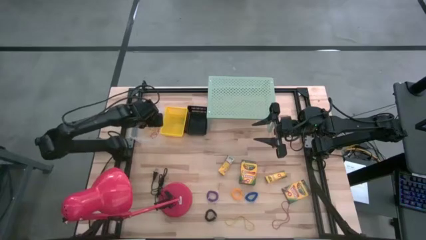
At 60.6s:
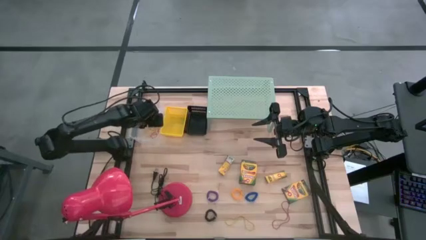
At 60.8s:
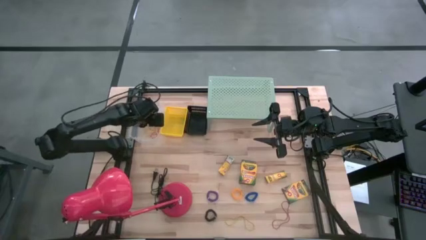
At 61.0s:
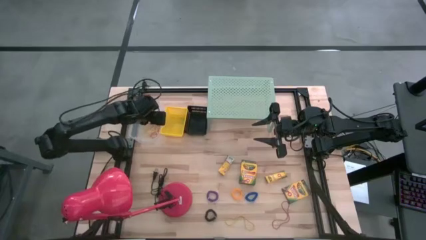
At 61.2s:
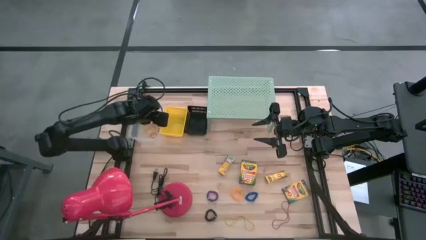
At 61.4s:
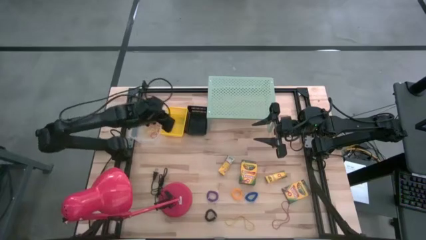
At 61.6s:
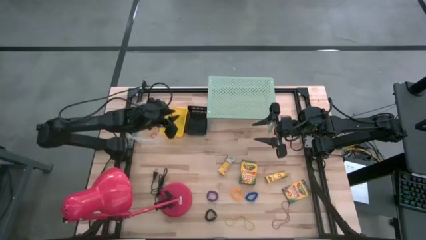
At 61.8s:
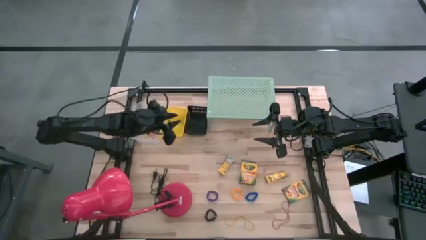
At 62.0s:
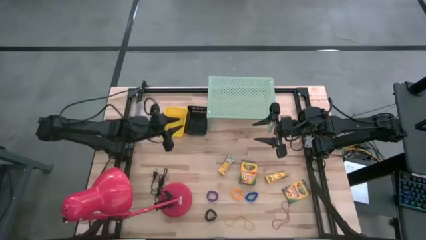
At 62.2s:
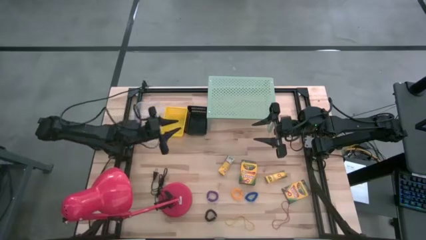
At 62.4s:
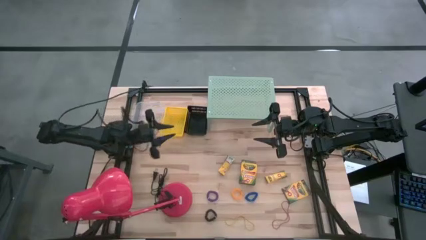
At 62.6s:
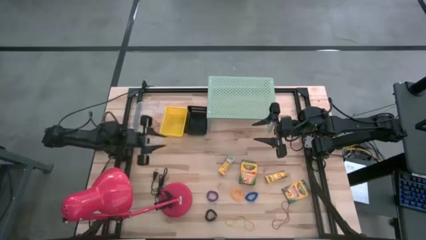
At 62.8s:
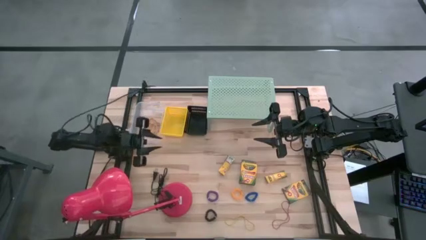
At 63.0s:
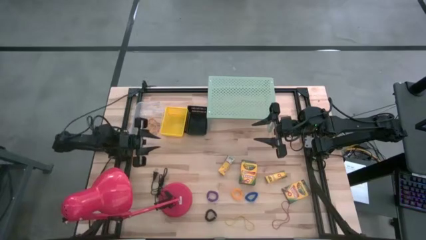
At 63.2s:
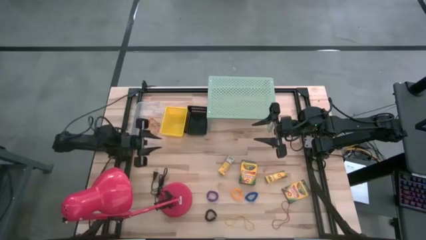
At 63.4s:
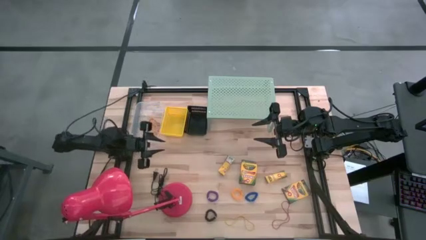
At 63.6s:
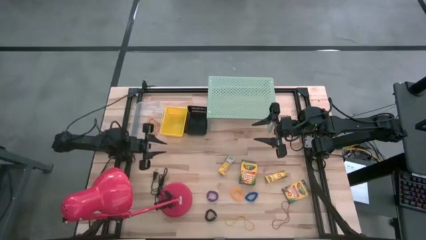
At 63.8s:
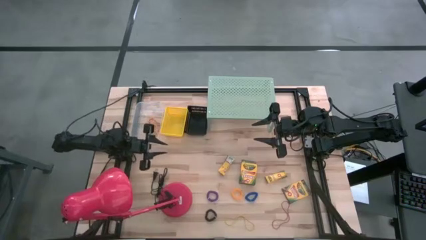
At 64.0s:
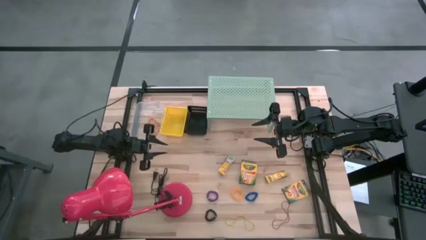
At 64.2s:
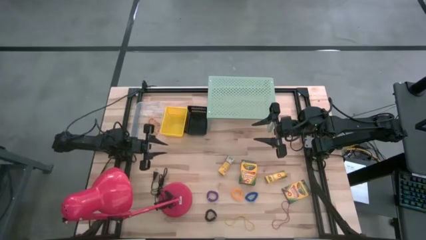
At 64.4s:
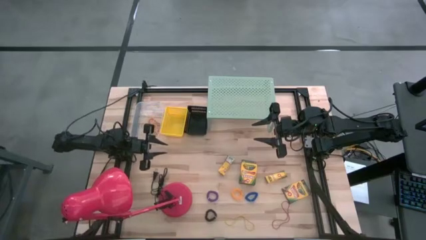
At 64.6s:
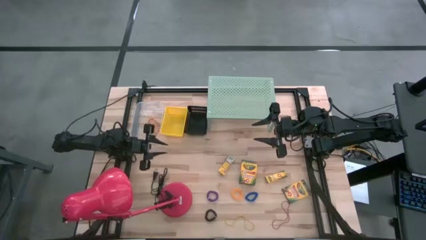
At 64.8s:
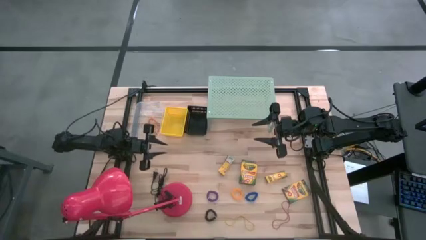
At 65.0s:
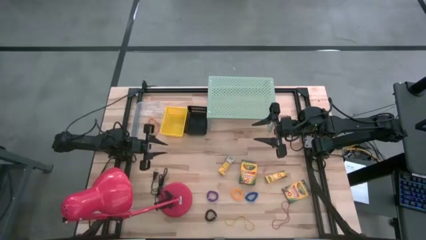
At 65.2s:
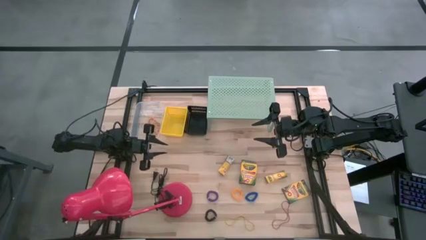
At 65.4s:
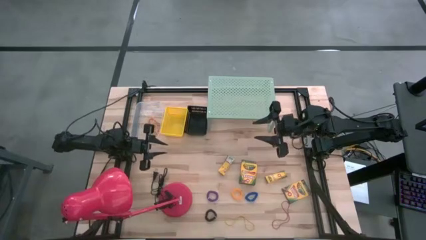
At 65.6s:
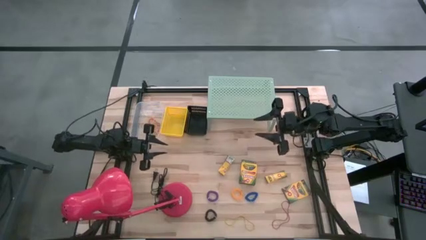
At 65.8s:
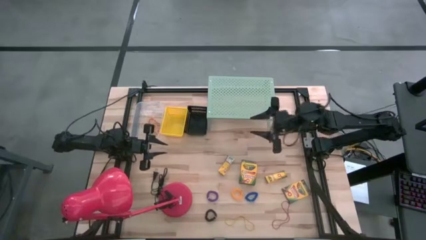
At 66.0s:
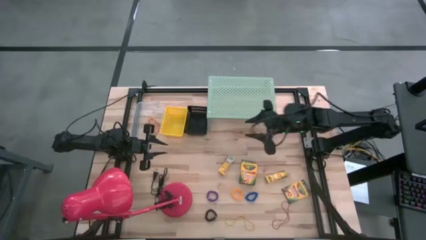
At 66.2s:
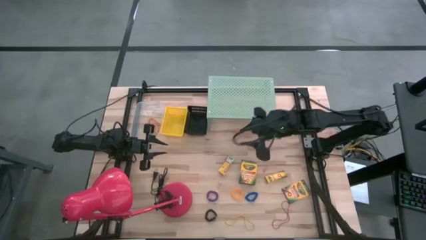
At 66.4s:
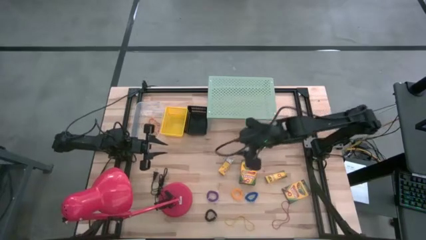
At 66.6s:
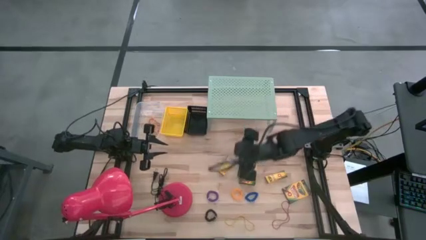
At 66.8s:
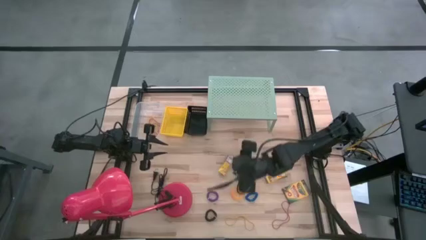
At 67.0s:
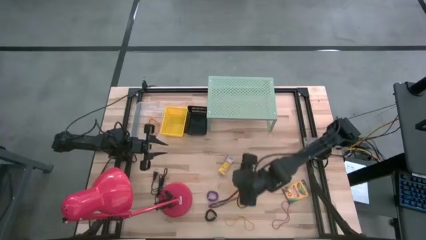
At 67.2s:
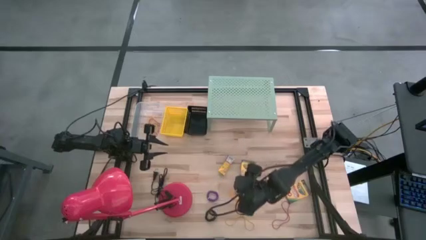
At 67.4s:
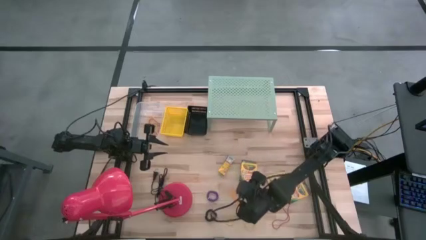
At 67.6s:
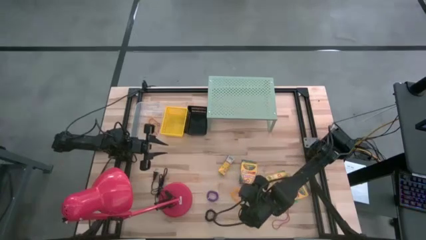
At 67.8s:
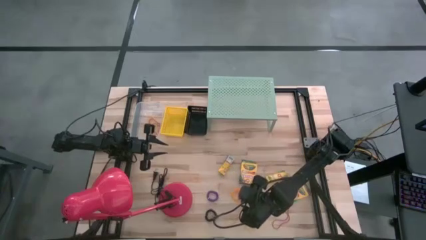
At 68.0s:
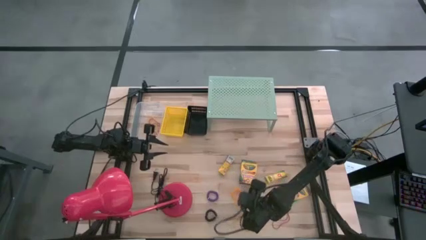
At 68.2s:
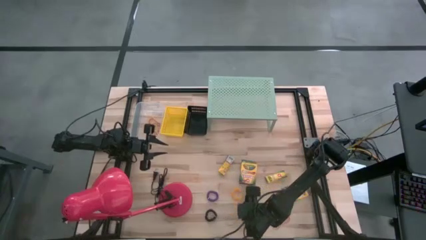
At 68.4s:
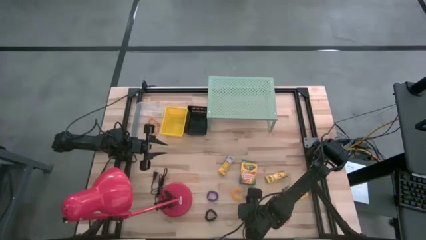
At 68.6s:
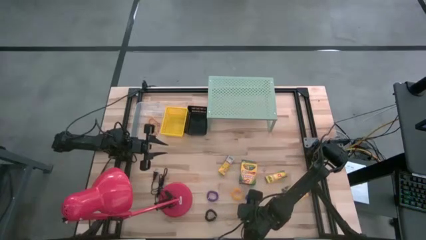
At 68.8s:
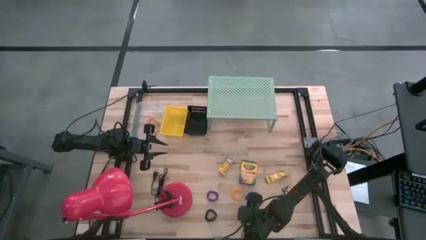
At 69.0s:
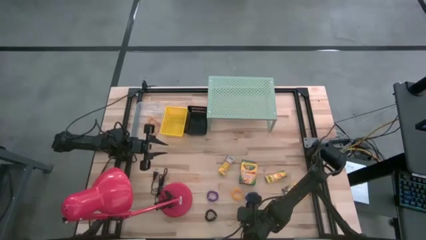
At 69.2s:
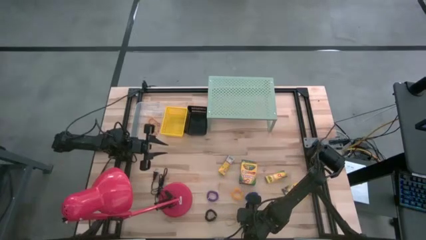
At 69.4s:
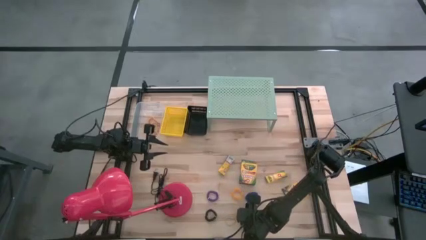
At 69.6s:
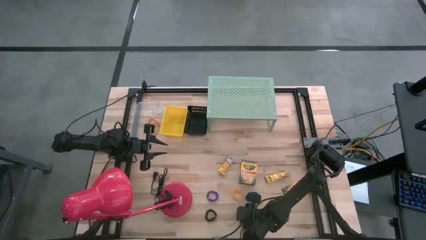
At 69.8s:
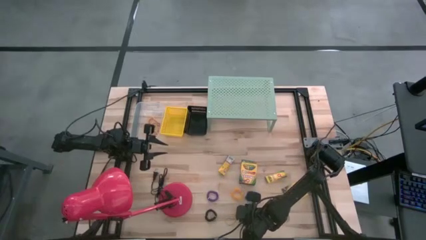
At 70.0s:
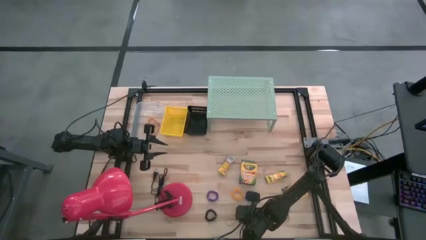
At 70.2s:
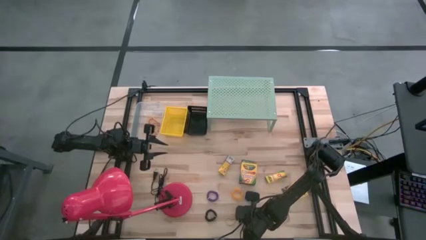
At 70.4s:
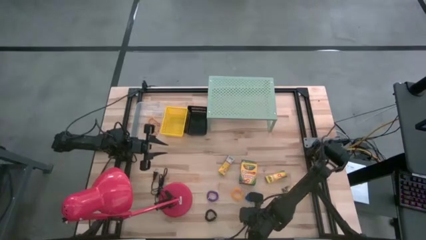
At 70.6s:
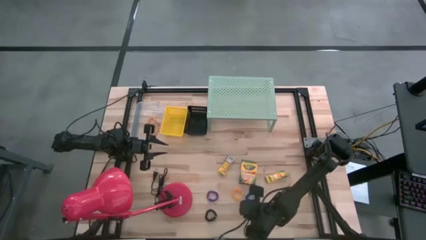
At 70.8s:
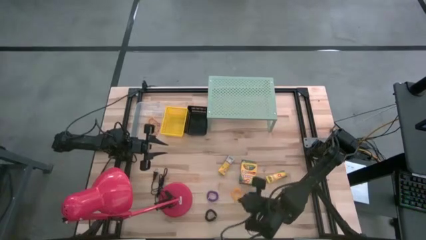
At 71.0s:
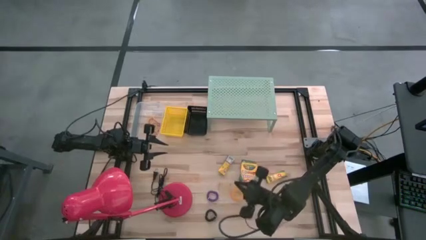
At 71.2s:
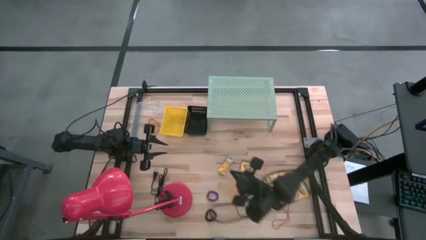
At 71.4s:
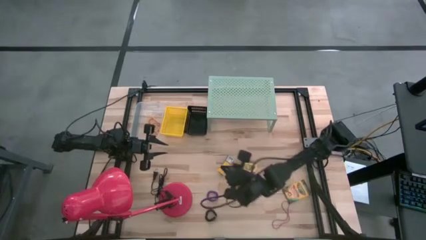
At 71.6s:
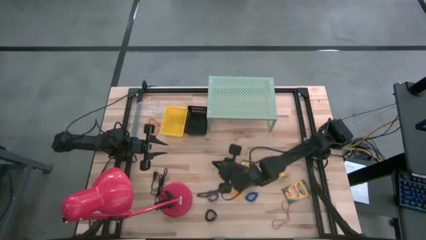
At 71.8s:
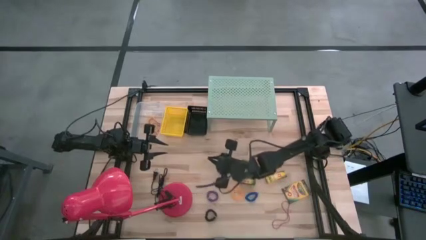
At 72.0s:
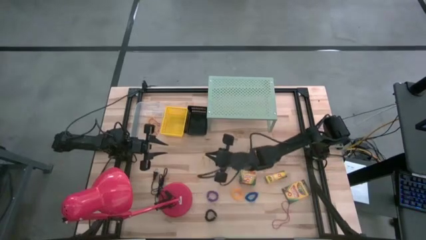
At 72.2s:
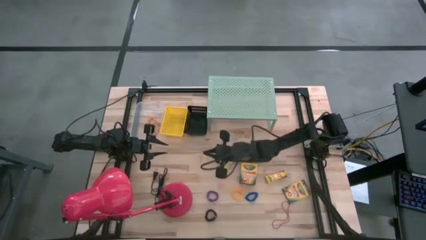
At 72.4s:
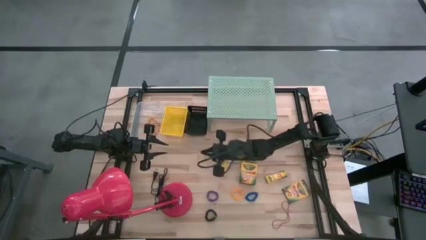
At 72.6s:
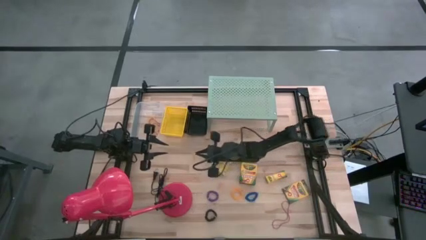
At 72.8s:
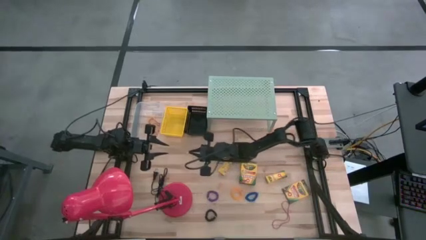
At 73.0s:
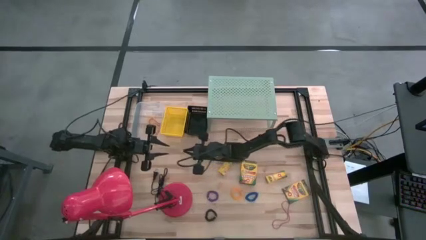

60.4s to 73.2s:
Task: Pick & Place Office Desk Supplies
Put the yellow rubber band into the transparent bin

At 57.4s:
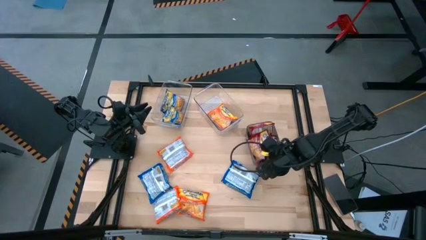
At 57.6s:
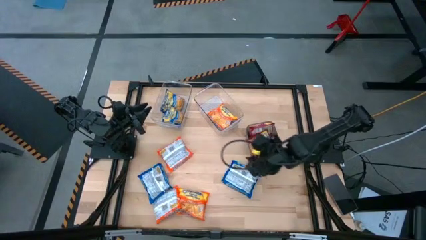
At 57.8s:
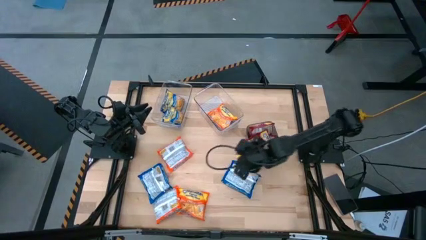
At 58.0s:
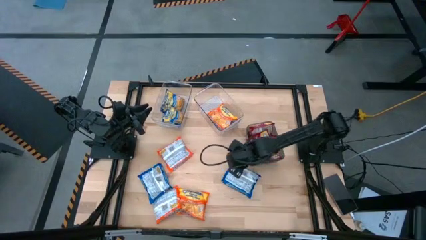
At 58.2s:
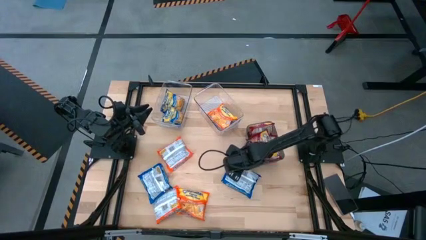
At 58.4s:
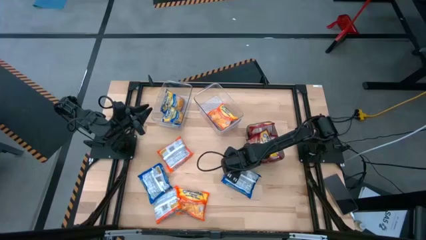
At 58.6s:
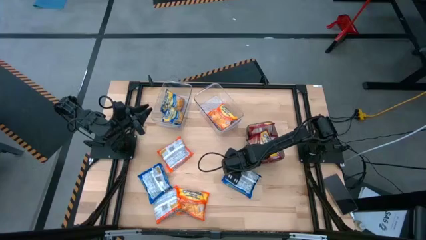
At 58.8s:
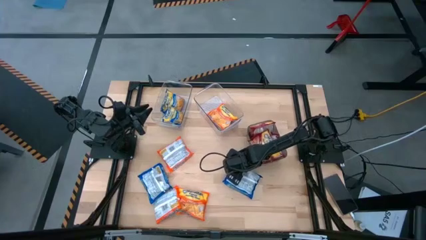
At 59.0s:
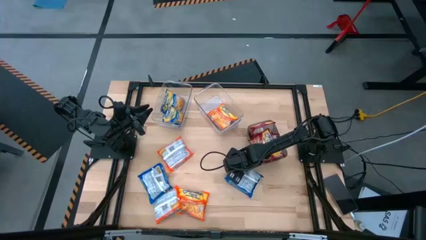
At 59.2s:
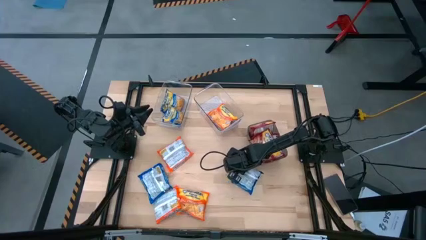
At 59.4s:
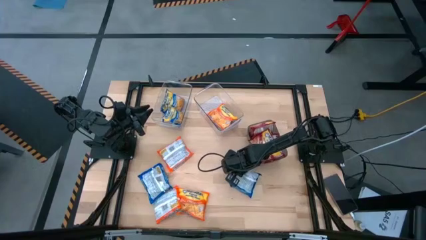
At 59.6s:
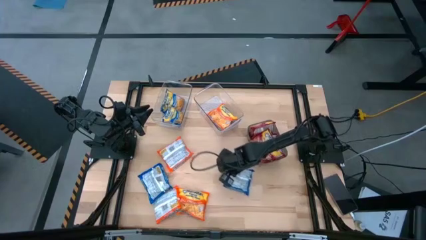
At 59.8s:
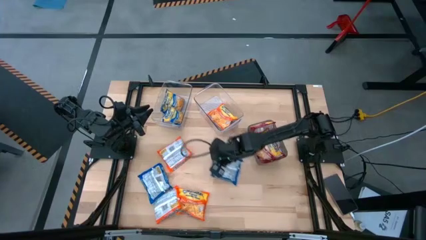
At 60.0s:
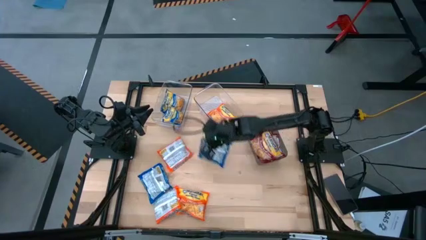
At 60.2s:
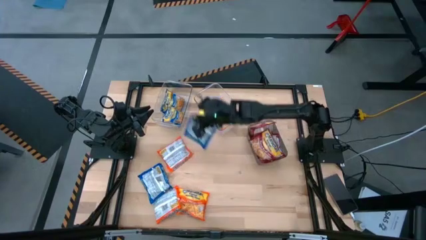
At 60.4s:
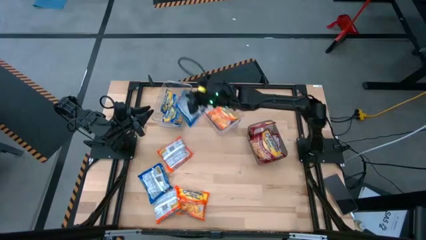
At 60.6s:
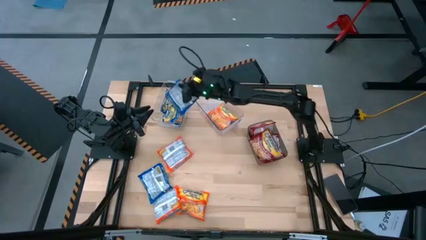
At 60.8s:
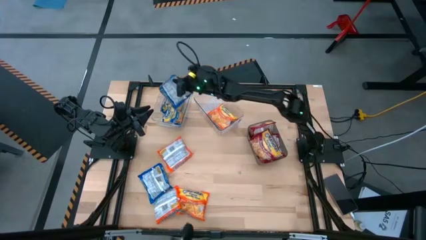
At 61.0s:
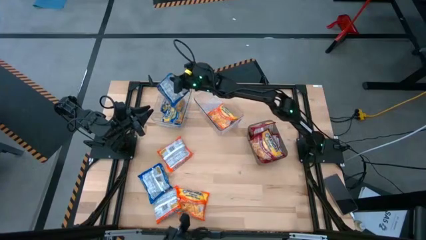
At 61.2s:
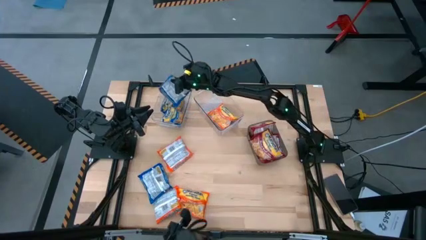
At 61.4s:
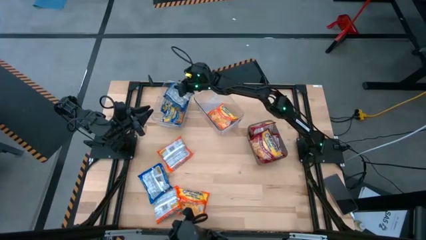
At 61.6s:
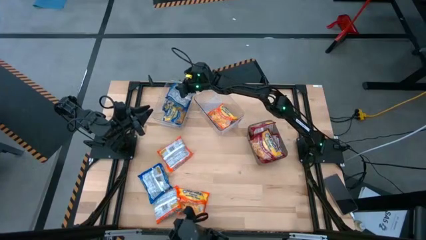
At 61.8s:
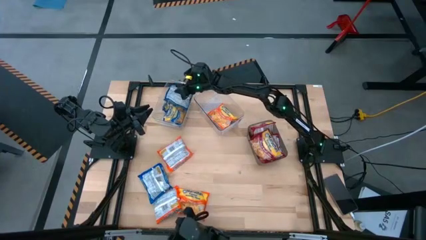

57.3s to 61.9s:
Task: Sort Maruchan noodles
Put the blue noodle pack into the left transparent bin

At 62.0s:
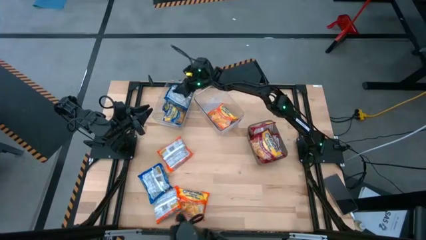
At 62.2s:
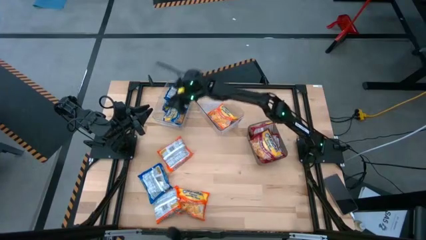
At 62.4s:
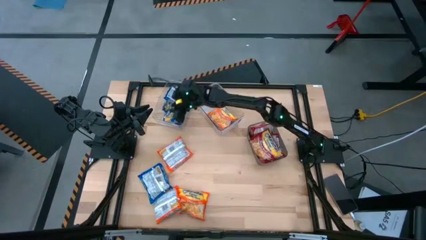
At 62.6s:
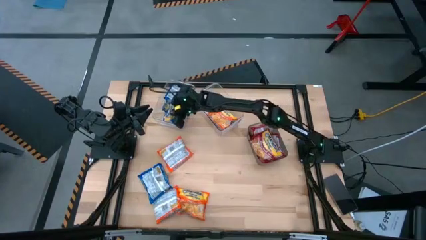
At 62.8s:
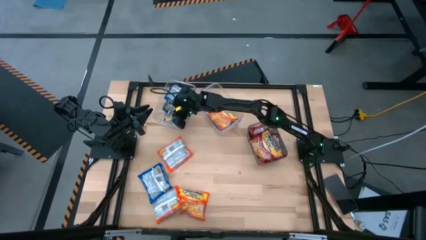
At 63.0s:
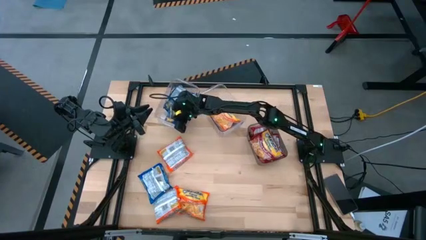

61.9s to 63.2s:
Adjust the blue noodle pack in the left transparent bin
